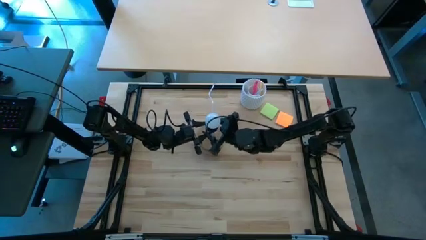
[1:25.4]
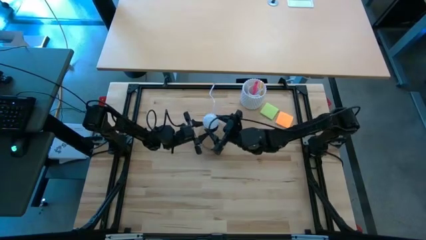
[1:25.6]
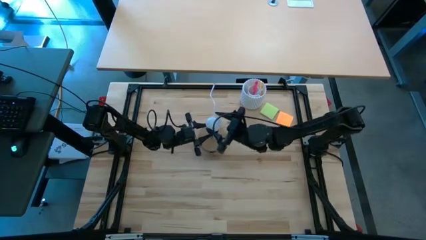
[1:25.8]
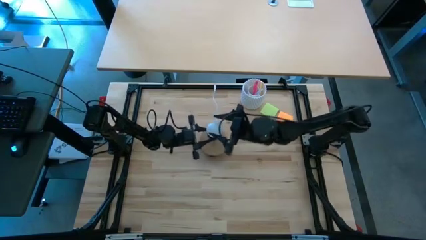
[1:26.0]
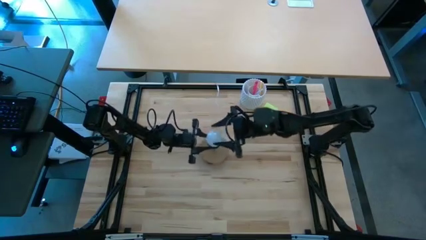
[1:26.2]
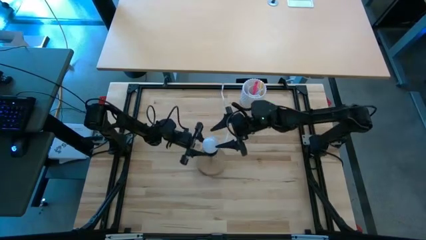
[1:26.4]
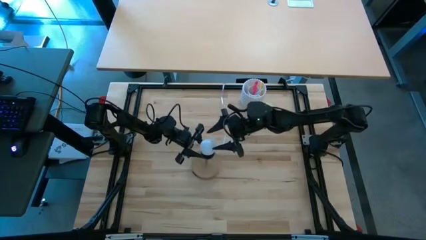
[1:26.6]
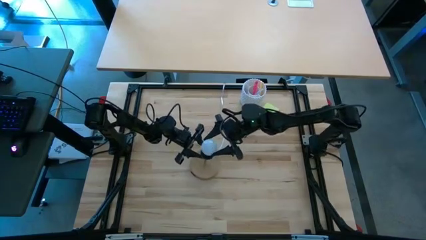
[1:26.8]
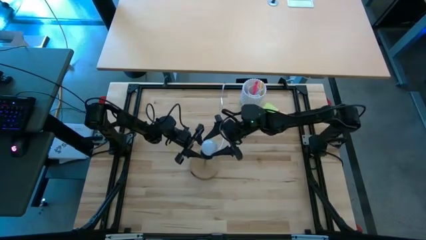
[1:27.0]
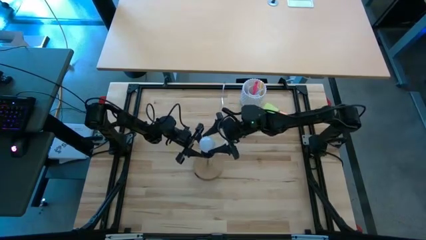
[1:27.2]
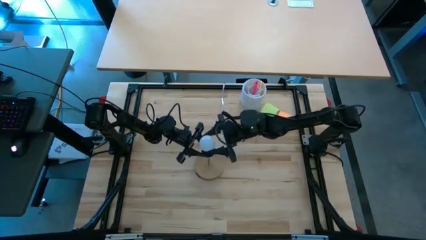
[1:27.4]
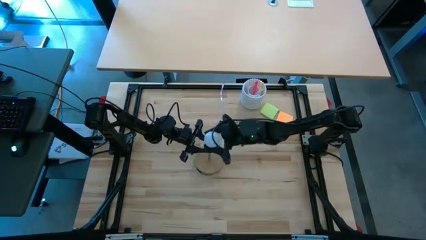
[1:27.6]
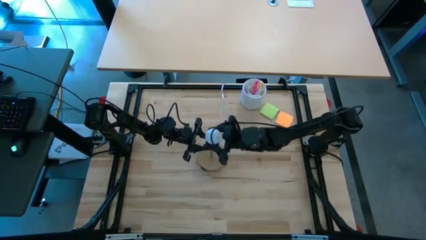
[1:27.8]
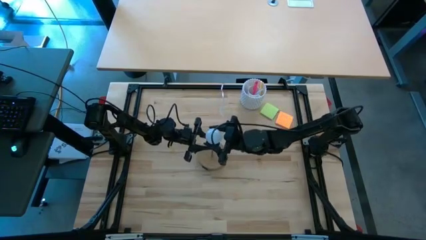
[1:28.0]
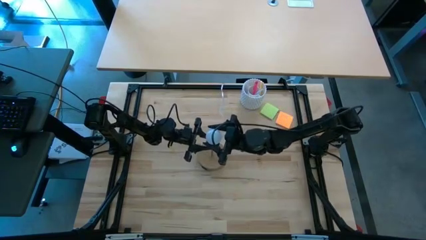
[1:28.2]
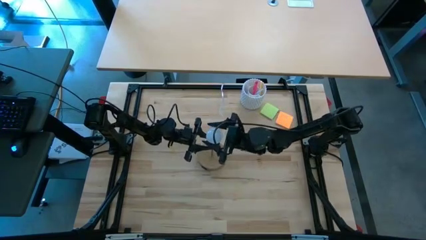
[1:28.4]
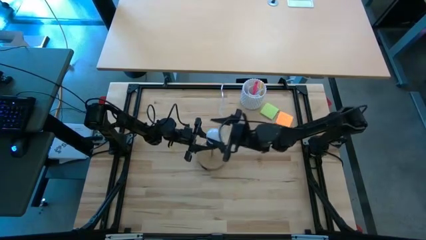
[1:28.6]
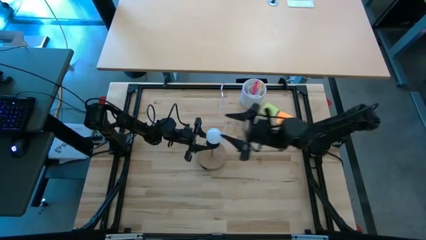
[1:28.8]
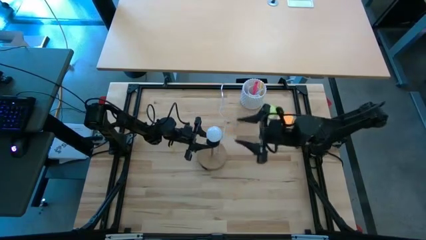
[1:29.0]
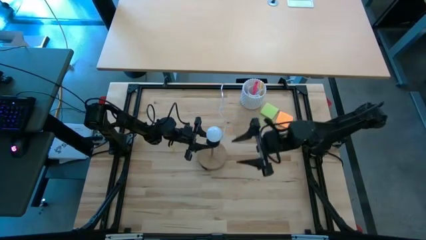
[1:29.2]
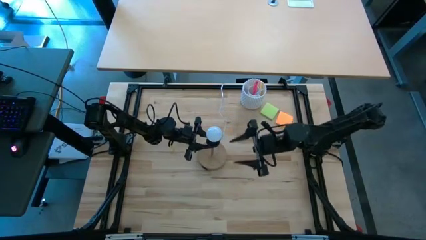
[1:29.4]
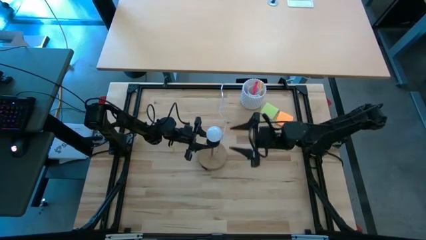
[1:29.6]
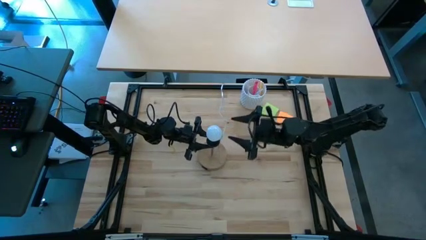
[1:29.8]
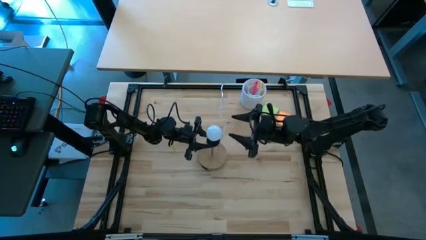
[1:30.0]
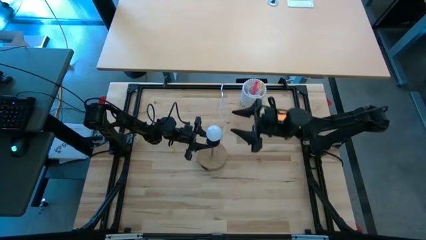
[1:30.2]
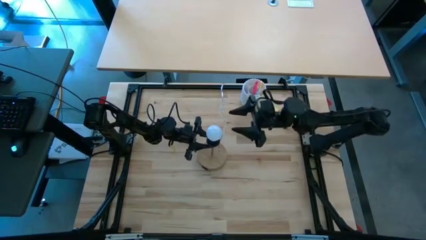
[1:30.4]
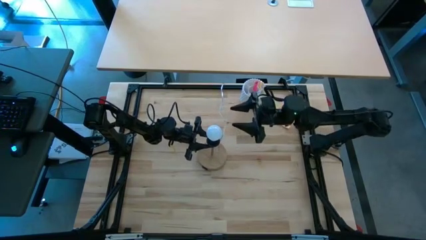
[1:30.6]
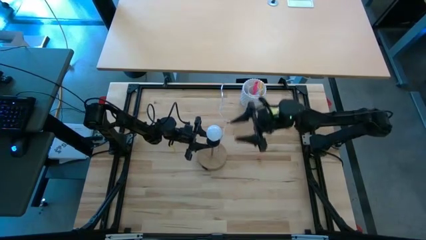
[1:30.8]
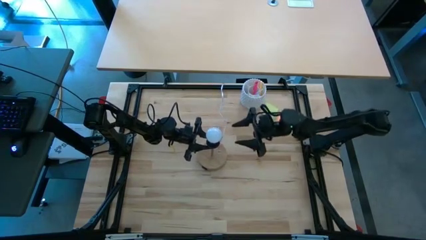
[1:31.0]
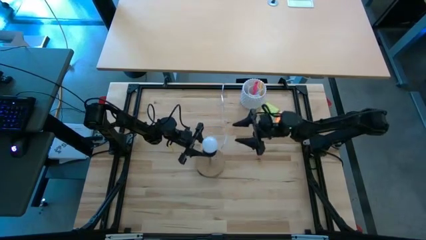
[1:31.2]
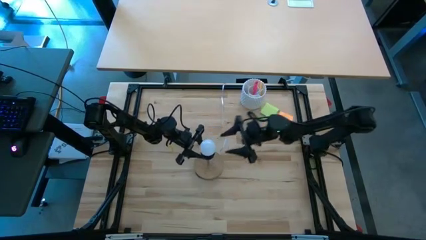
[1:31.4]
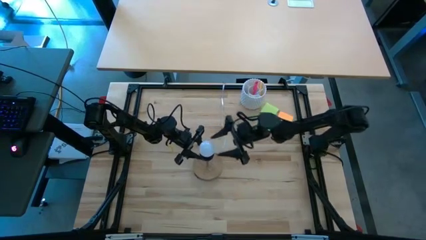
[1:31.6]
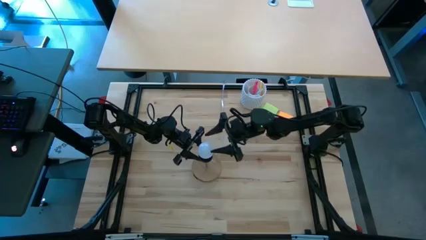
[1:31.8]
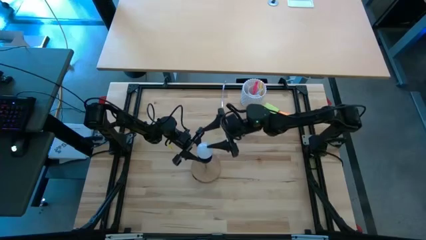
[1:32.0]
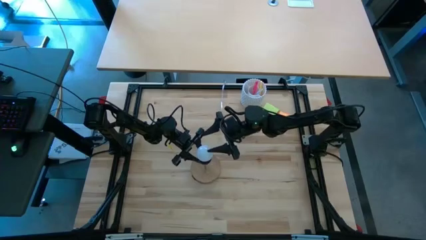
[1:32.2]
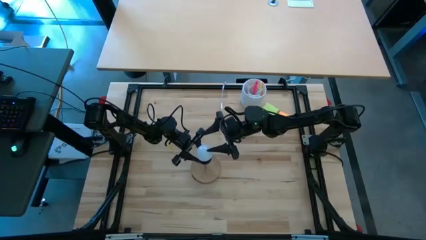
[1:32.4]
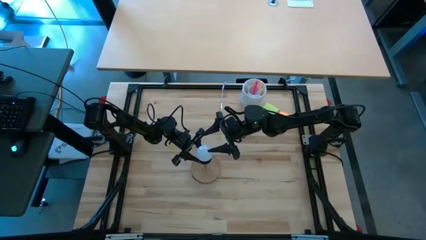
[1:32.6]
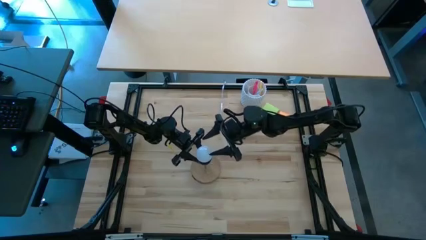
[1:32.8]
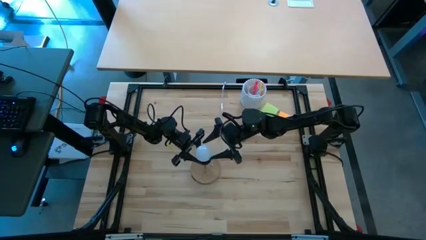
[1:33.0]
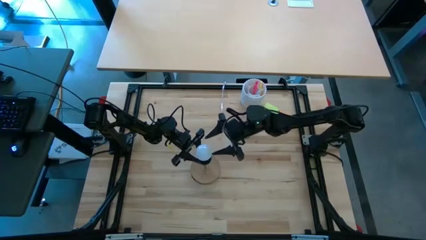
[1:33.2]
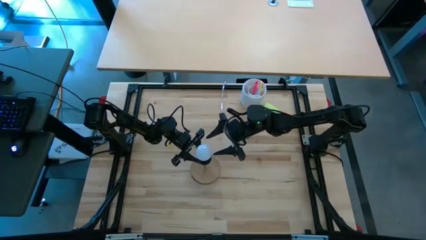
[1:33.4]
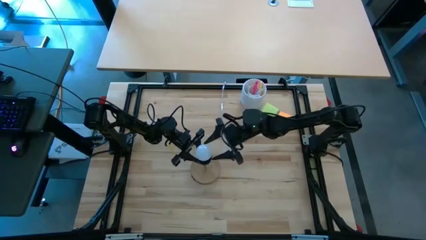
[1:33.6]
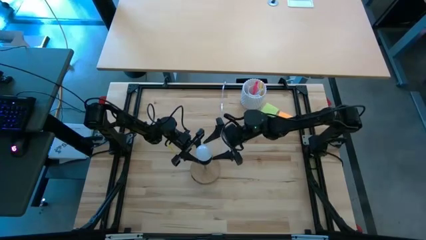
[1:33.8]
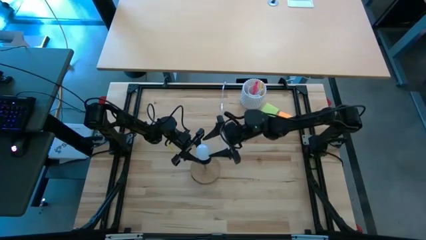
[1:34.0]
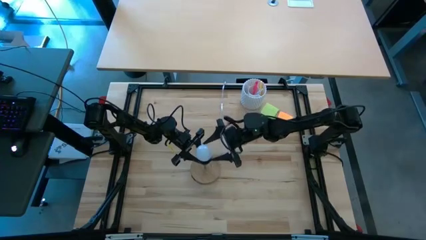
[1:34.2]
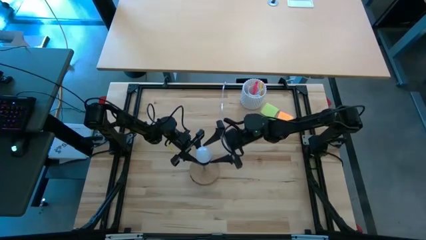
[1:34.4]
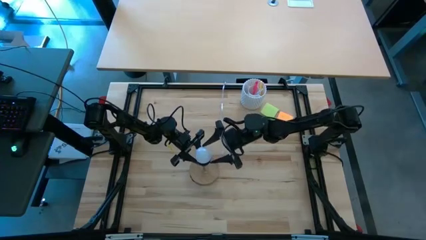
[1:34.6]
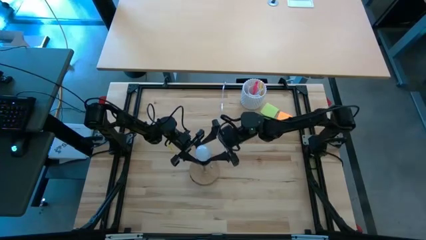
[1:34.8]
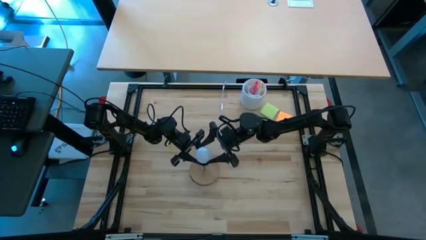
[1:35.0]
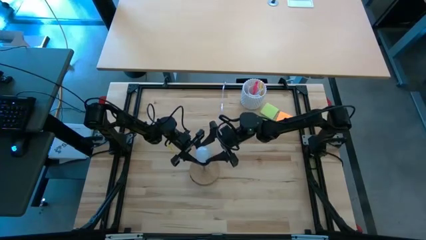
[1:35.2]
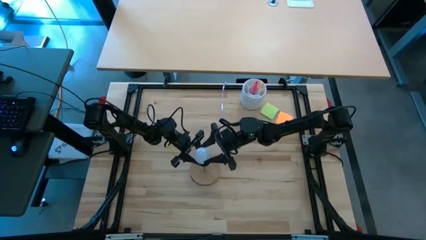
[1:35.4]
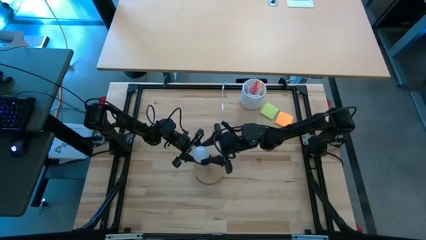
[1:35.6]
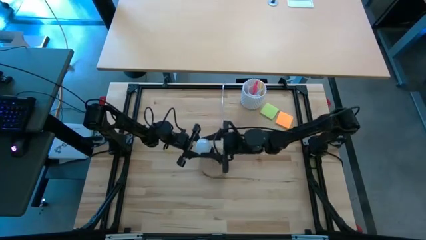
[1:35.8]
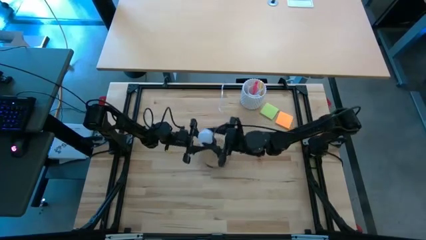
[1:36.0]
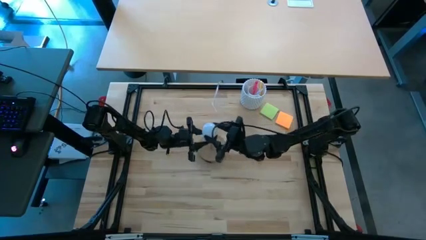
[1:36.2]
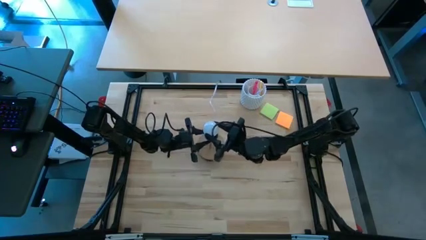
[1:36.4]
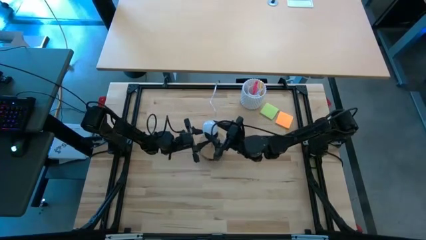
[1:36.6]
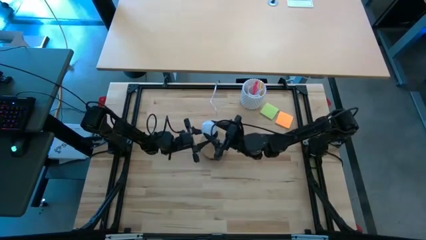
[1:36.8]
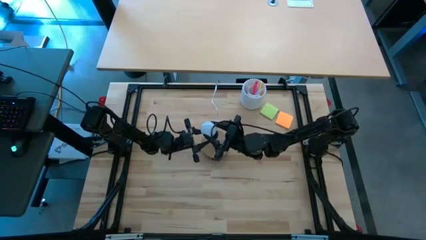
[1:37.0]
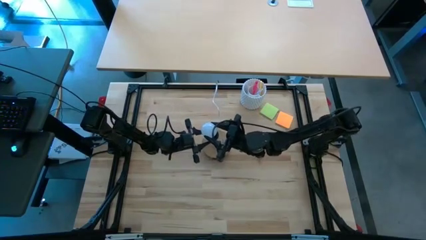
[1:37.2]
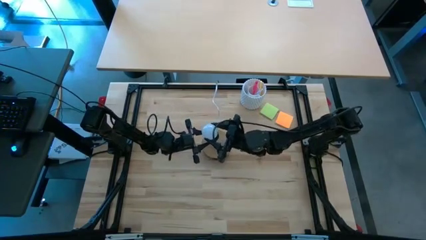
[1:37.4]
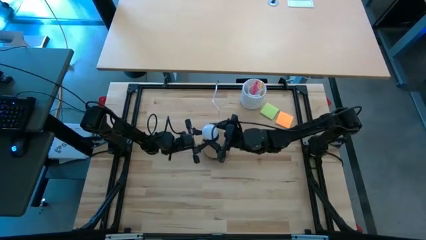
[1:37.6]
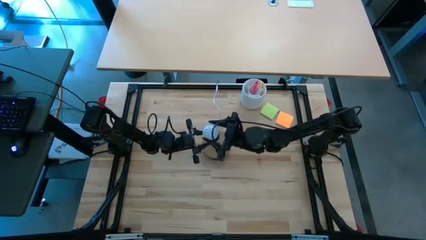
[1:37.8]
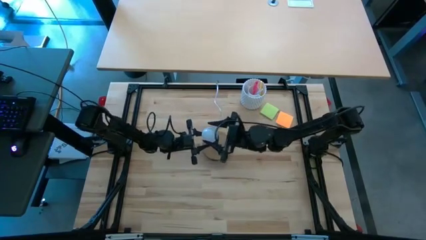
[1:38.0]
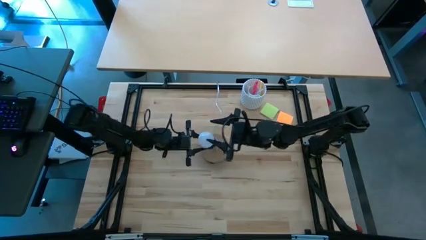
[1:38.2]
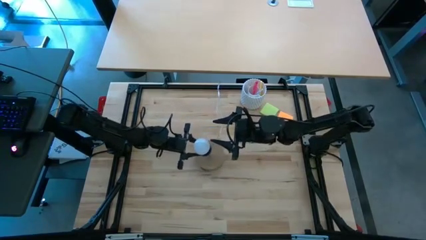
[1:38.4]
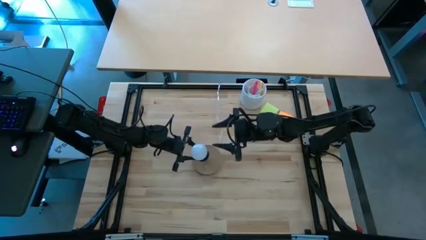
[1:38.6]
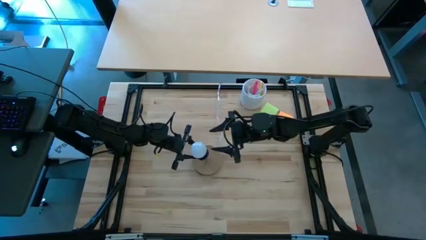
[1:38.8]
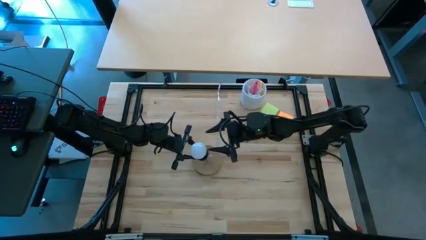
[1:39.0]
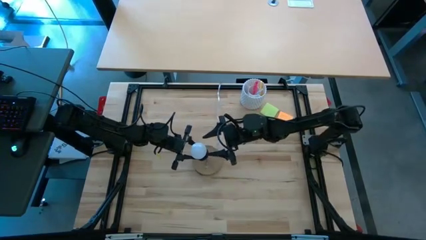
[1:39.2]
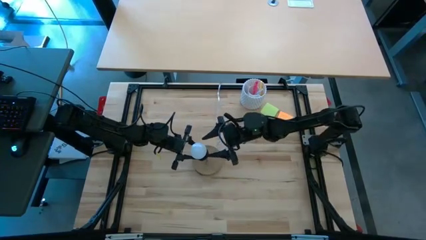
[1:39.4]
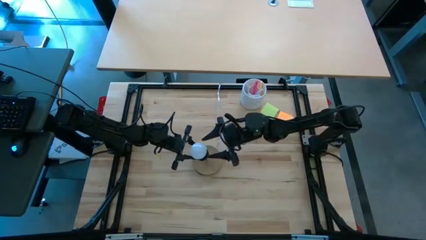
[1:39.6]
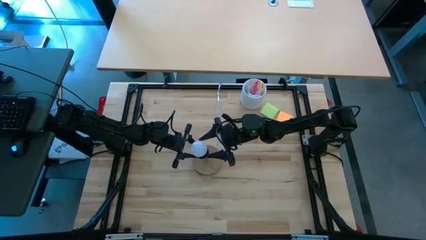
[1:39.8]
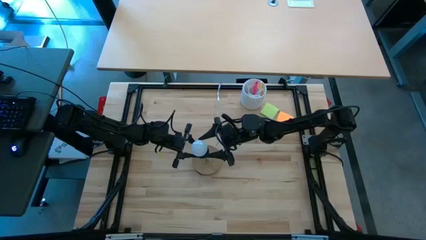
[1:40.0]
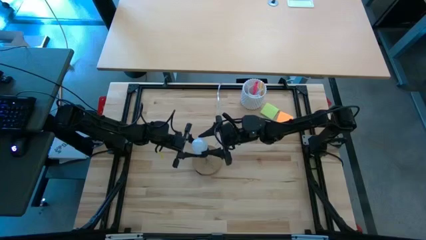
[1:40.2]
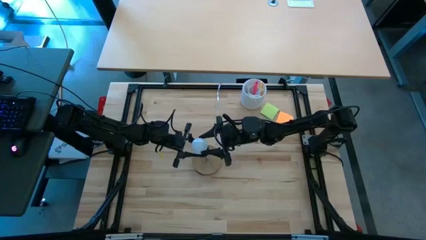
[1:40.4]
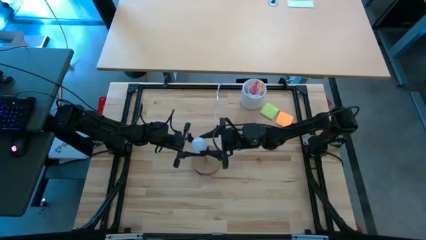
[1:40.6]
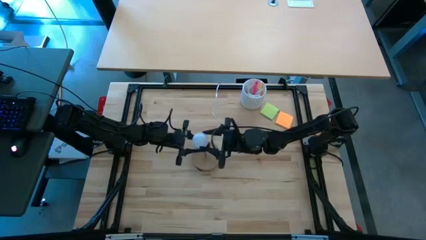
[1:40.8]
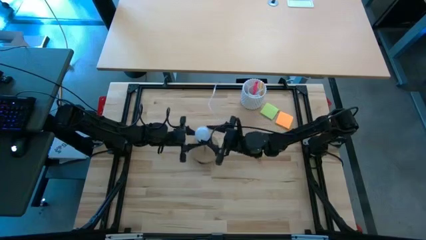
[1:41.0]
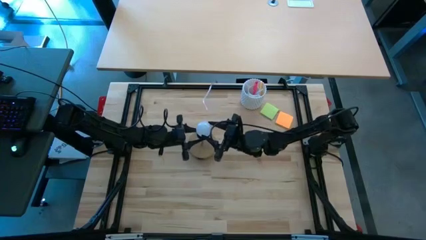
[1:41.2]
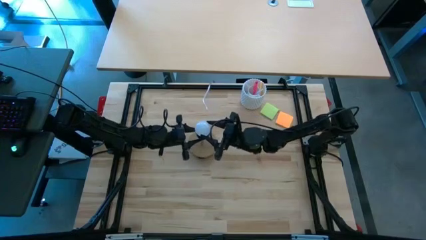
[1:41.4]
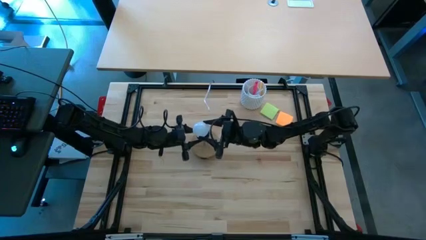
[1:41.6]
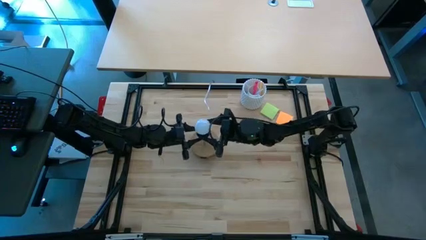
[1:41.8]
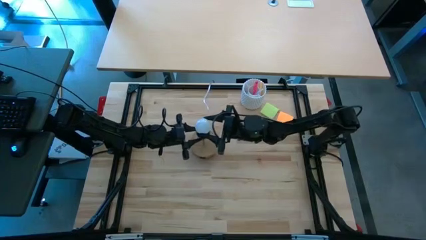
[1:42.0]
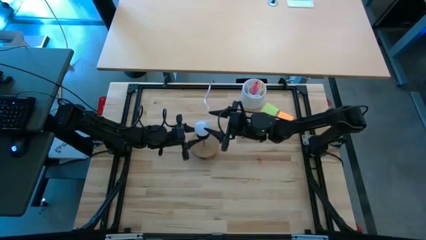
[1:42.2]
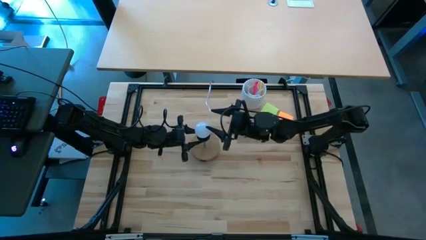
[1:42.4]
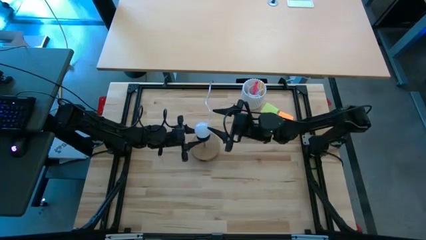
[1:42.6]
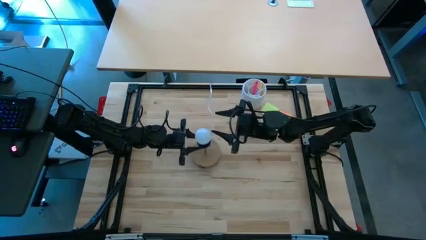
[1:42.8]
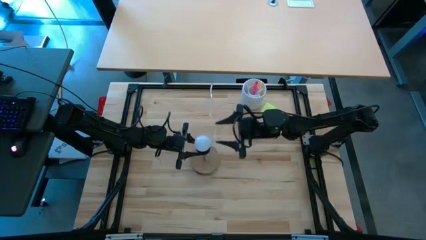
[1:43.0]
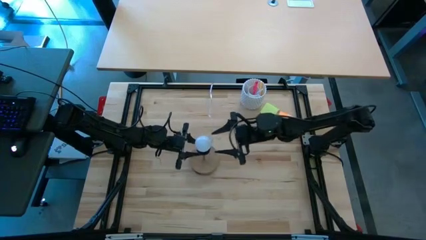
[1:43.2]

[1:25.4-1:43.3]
Task: Screw lightbulb
Insert the light bulb into the lamp
